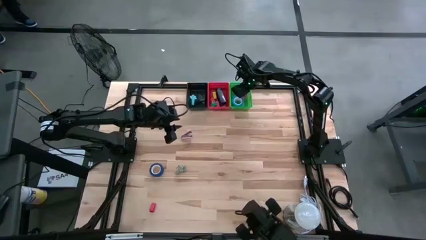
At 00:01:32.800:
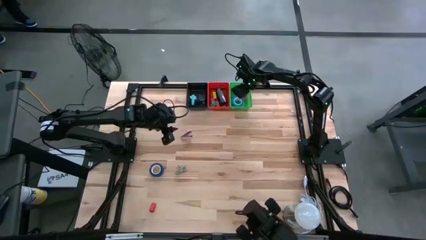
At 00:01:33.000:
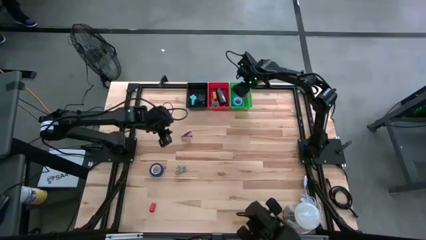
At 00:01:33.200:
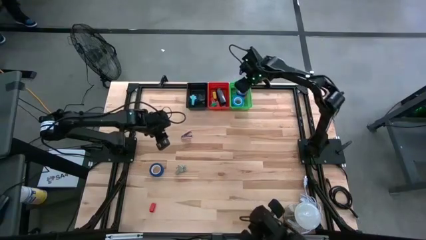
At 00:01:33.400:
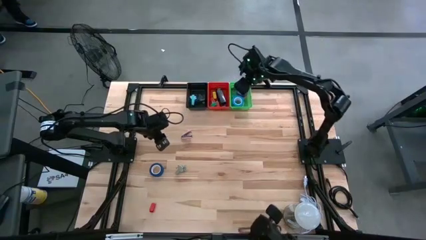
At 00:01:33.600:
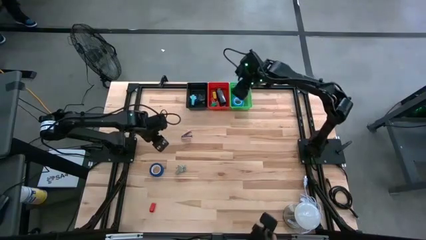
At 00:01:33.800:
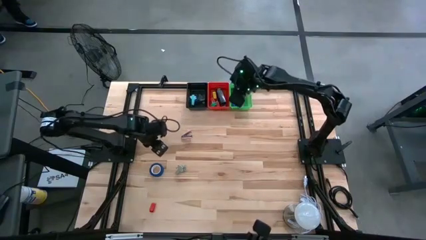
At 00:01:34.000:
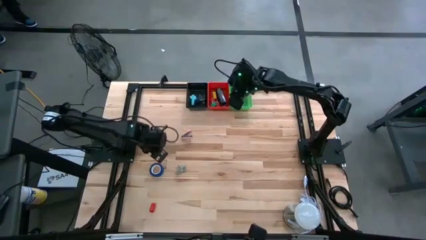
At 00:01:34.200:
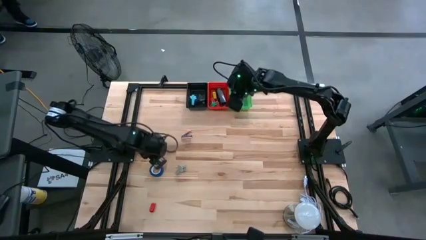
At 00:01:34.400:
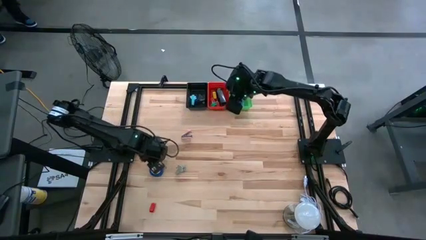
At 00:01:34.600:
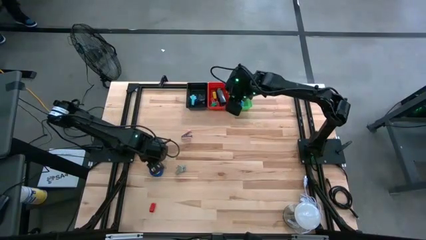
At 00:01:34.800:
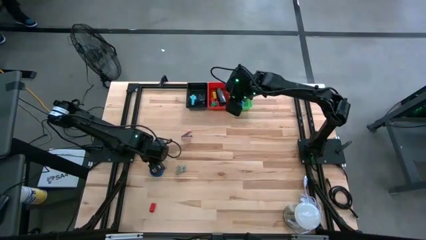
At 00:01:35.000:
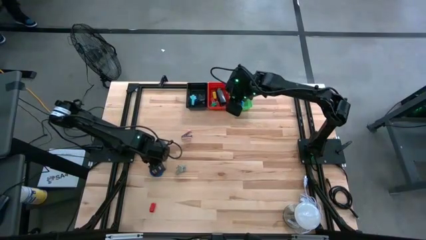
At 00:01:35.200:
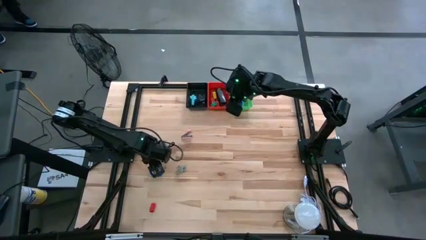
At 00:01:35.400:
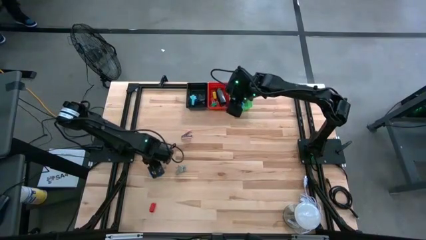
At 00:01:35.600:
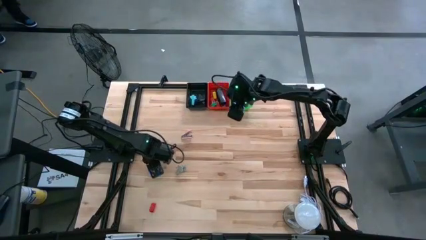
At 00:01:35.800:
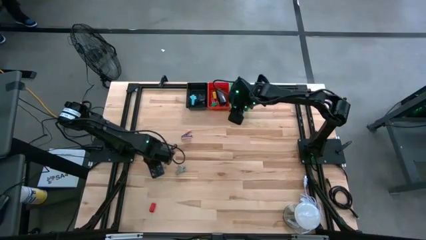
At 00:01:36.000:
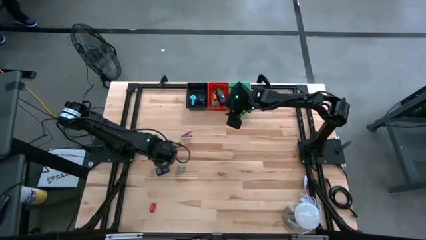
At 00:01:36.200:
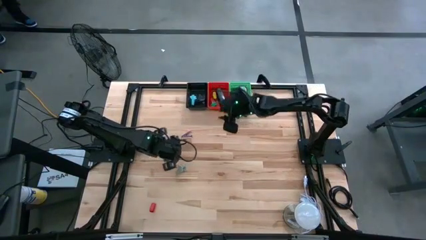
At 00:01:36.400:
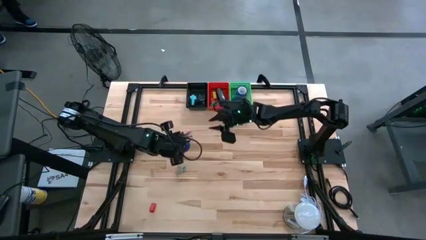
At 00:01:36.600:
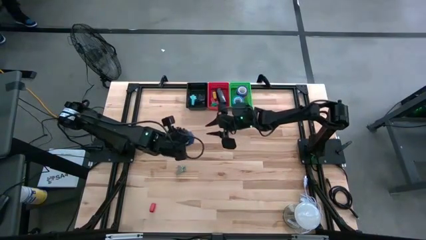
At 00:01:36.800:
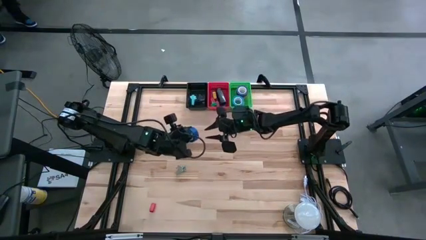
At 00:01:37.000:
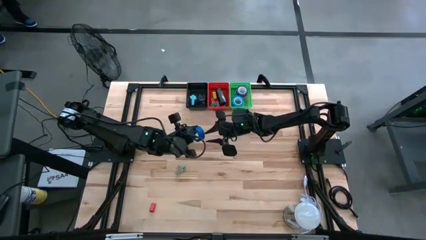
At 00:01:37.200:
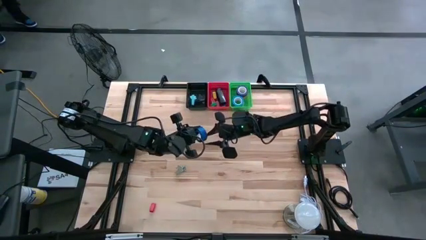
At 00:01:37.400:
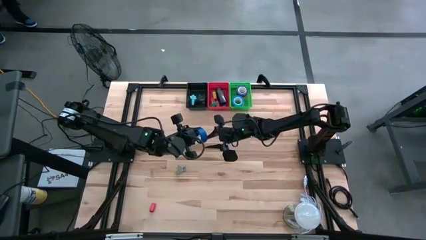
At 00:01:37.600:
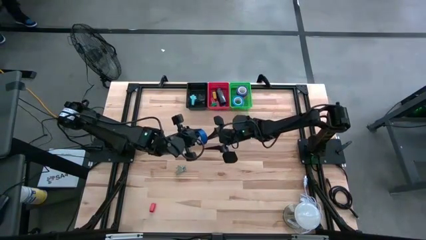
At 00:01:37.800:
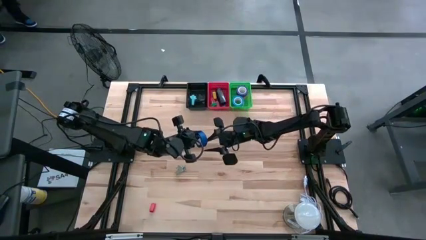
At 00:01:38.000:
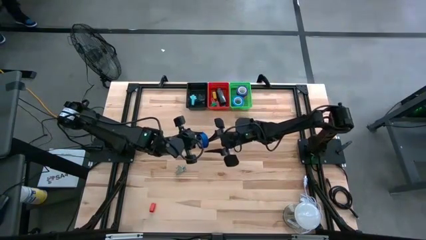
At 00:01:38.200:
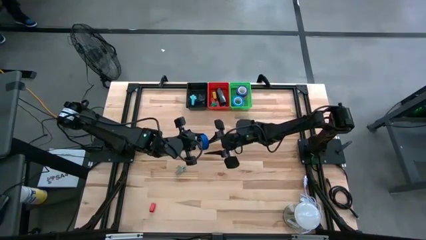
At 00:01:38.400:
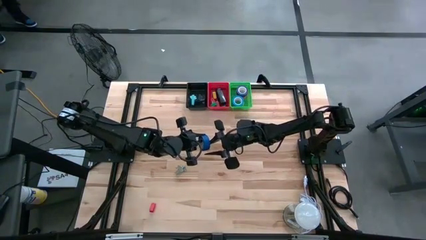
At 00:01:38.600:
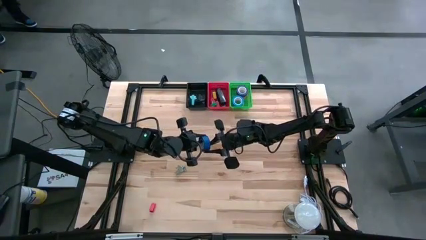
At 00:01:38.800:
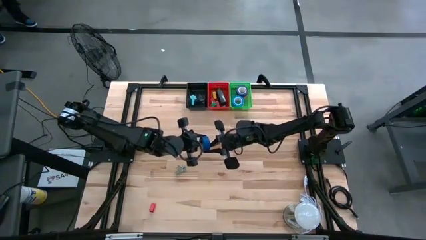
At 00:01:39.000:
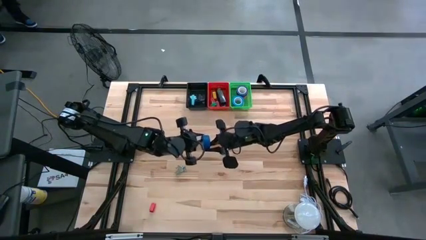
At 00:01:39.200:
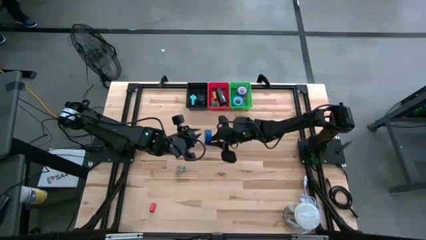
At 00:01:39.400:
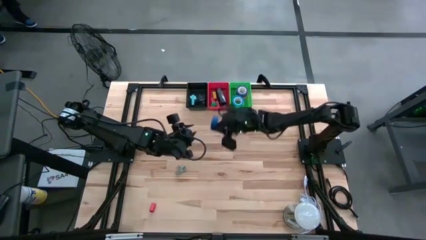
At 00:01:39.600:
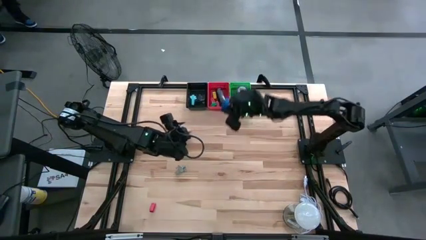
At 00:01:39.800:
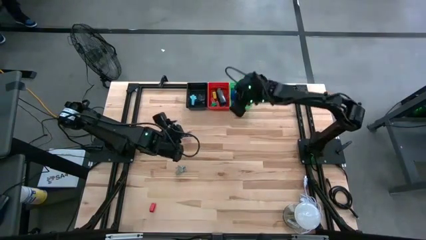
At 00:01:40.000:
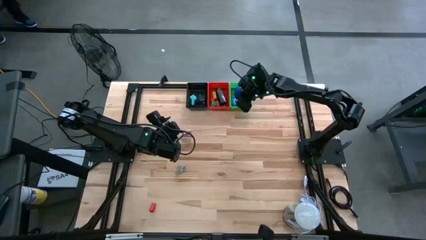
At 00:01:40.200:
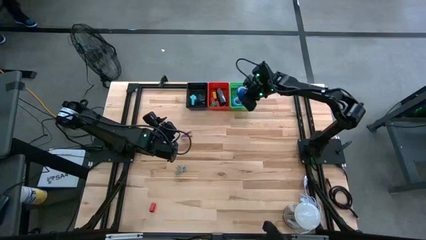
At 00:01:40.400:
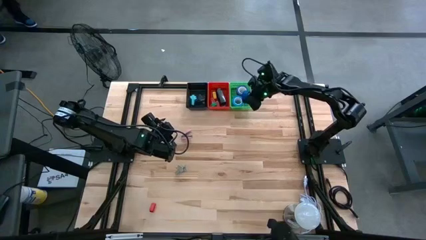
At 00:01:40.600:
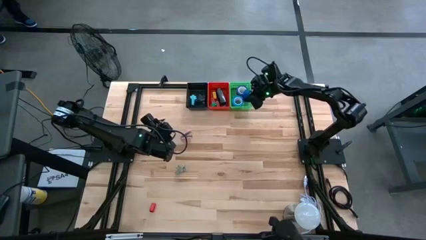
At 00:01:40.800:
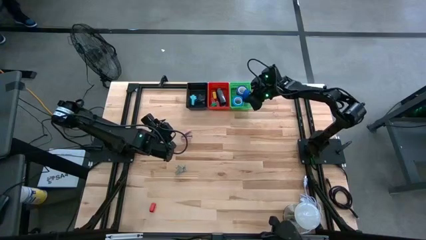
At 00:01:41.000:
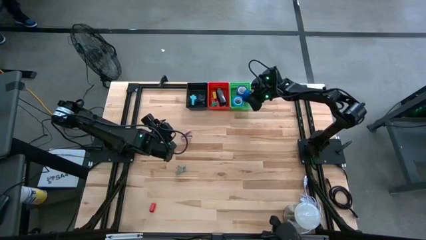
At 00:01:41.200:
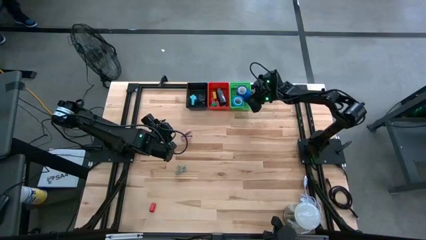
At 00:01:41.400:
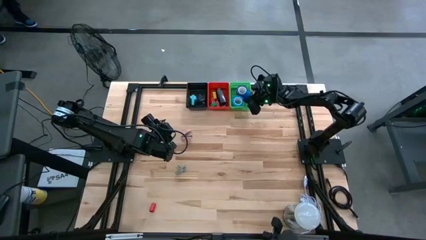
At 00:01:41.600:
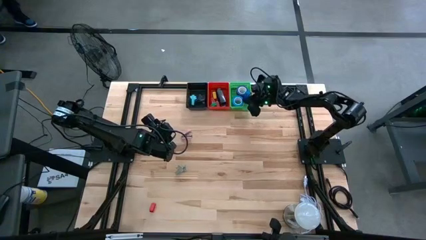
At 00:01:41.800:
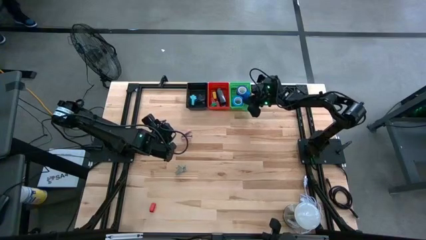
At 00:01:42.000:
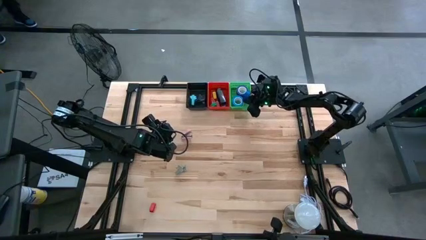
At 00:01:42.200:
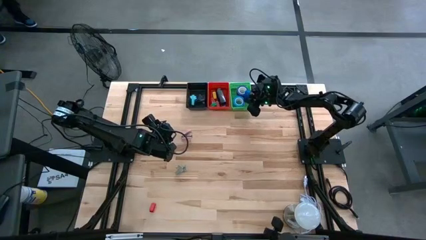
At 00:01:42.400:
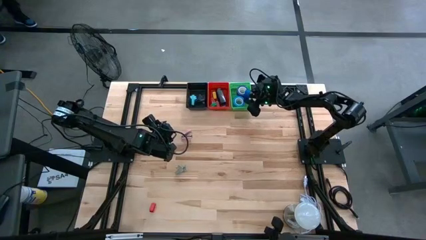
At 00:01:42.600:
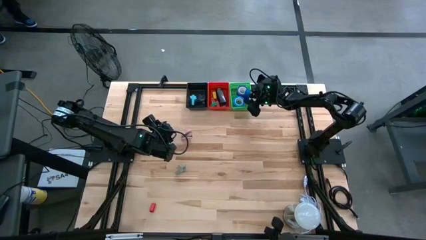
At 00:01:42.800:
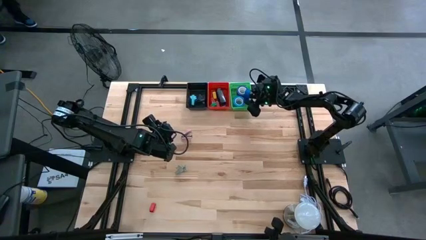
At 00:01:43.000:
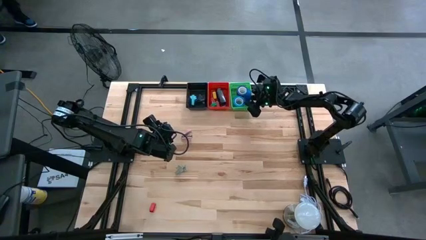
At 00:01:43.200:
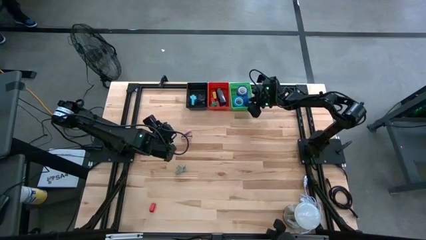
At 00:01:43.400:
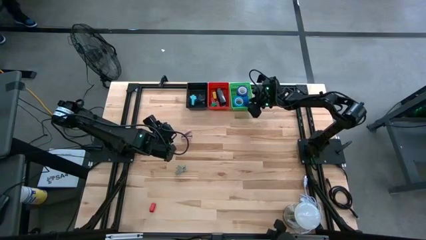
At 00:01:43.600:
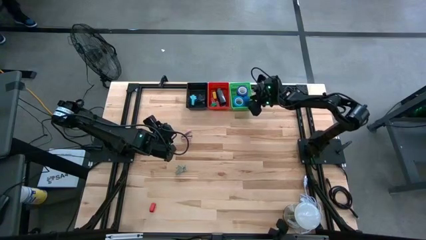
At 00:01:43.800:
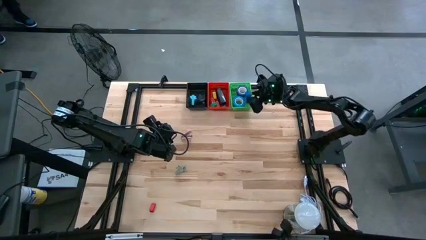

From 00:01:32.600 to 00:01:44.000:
Task: Pick and place Stapler, Stapler remover, tape
Put the blue tape into the green bin

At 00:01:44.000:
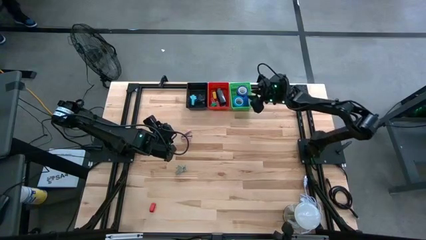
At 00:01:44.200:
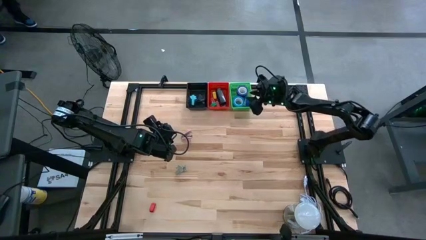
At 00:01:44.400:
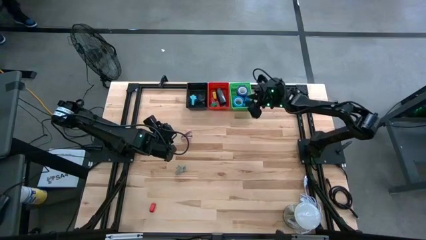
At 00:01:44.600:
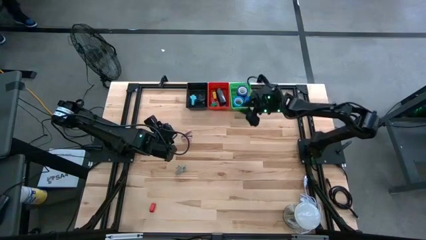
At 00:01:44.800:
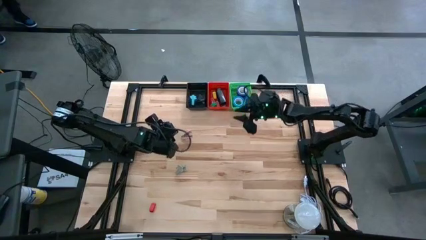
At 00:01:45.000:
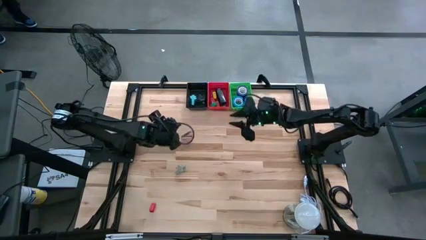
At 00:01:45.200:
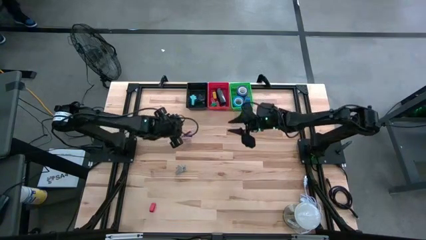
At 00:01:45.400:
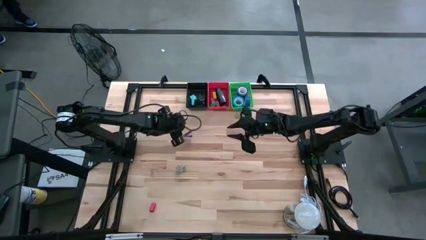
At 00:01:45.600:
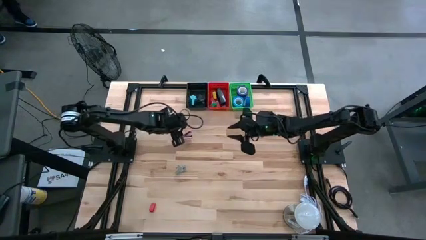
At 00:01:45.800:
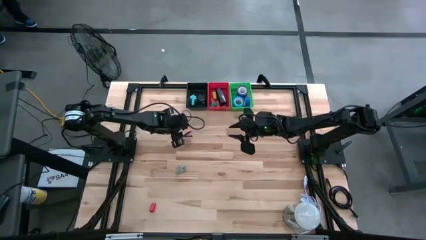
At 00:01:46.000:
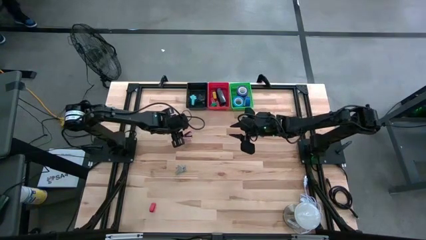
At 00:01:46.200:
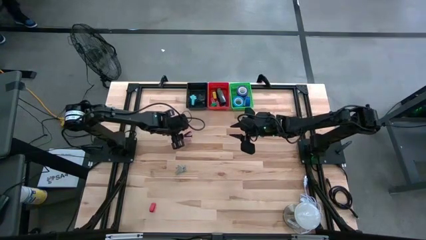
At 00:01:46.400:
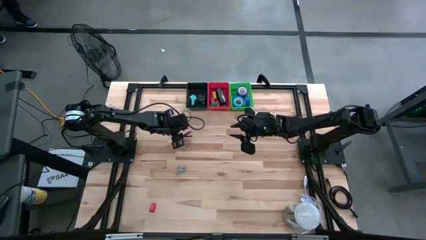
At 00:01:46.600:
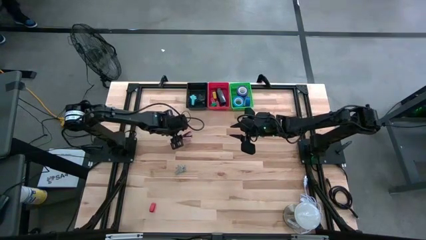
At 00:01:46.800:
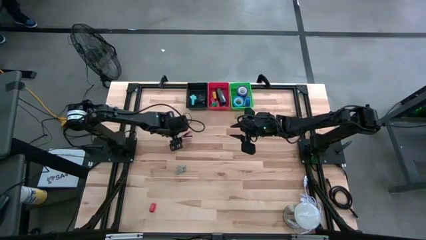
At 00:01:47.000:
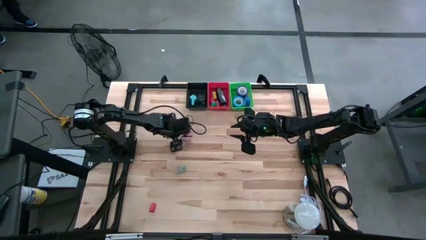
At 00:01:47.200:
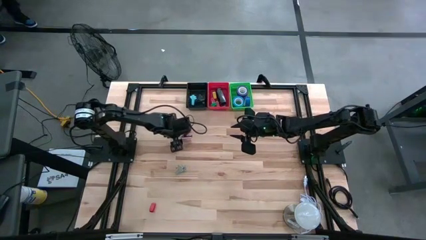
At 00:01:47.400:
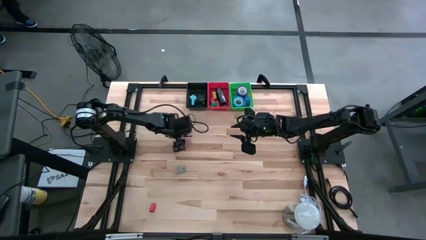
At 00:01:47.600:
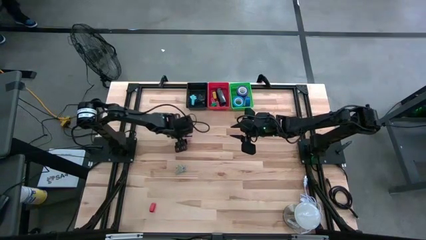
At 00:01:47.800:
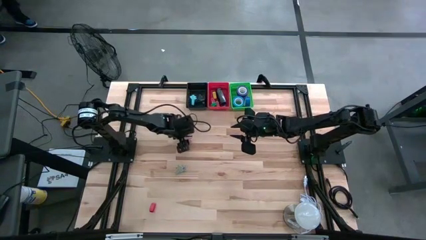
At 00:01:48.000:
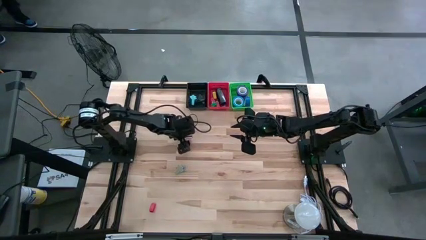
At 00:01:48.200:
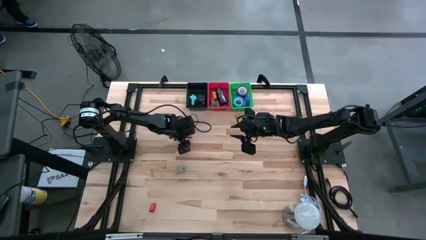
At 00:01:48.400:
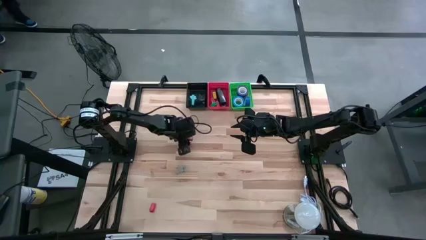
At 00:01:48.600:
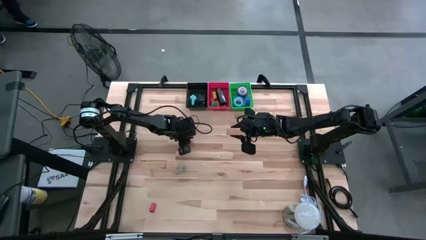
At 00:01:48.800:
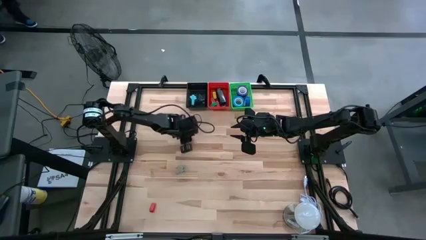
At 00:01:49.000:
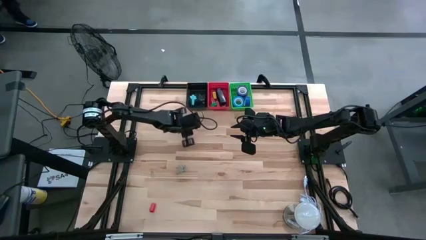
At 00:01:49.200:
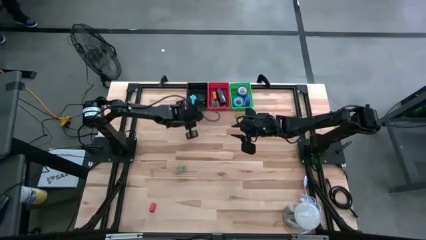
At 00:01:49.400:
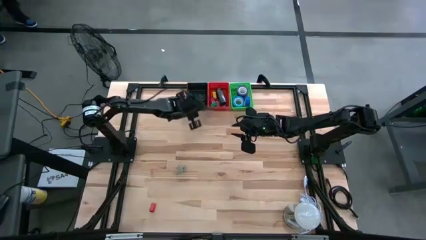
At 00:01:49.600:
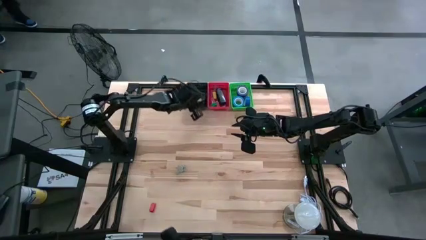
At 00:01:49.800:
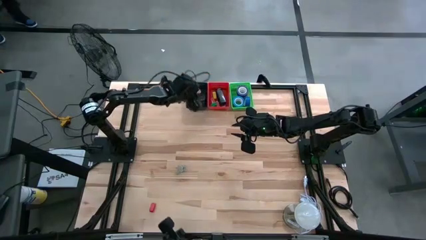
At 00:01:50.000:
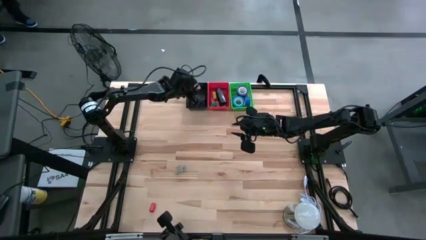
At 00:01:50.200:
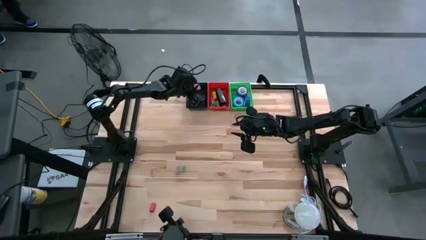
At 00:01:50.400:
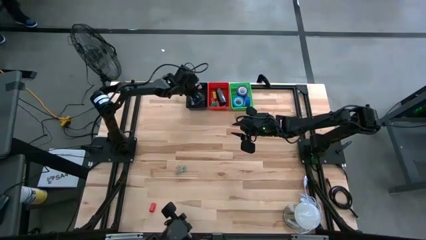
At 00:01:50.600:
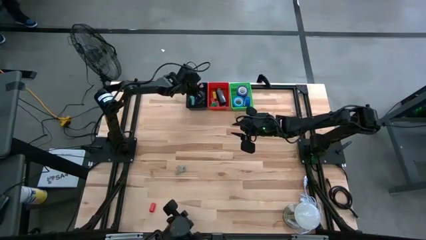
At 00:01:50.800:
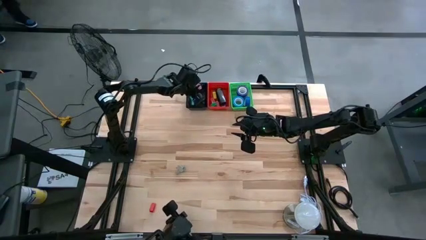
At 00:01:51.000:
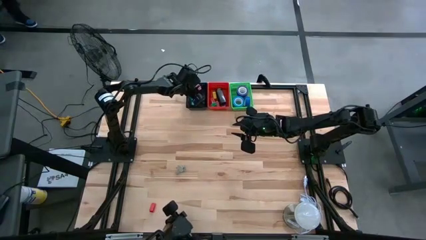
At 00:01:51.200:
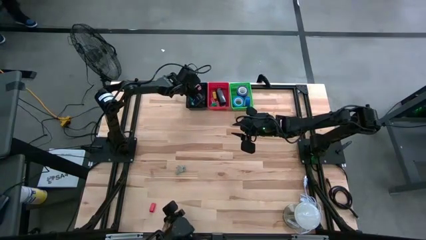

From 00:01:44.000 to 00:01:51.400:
Put the pink staple remover into the black bin
